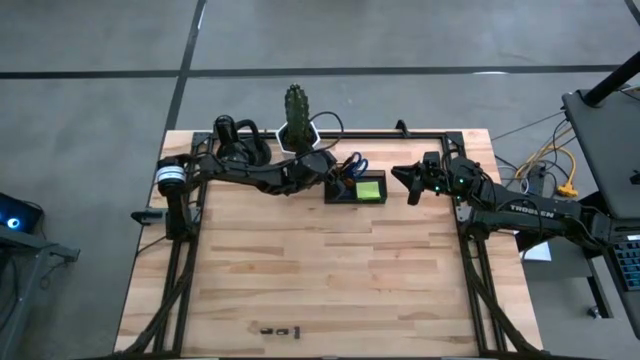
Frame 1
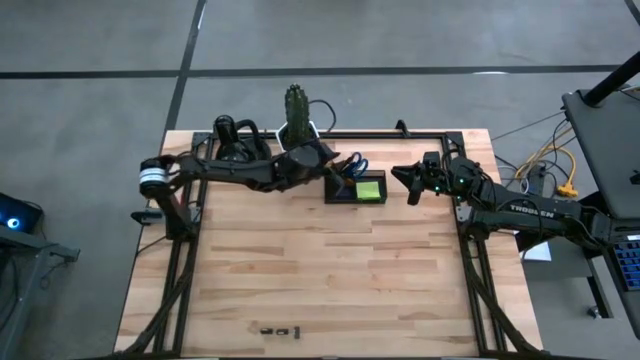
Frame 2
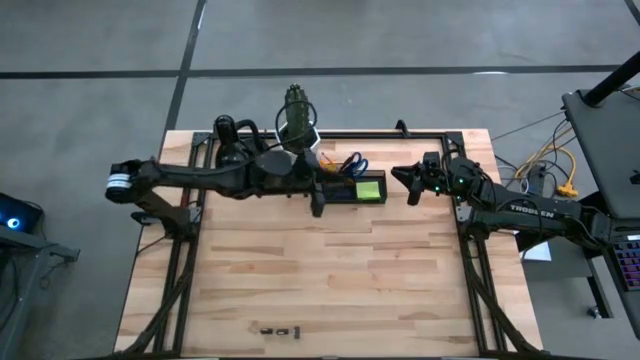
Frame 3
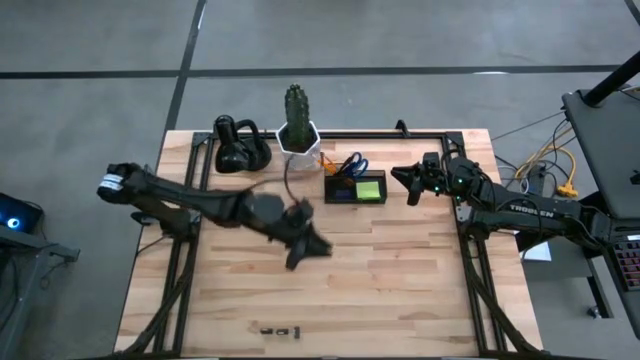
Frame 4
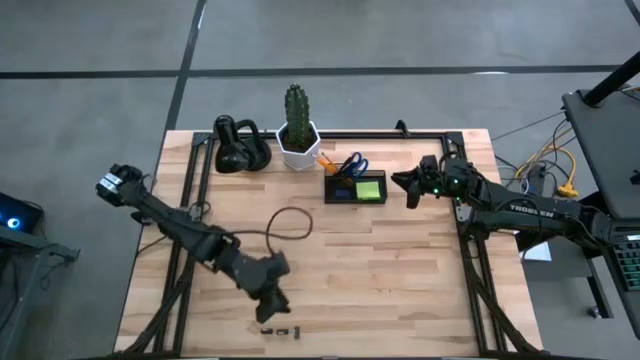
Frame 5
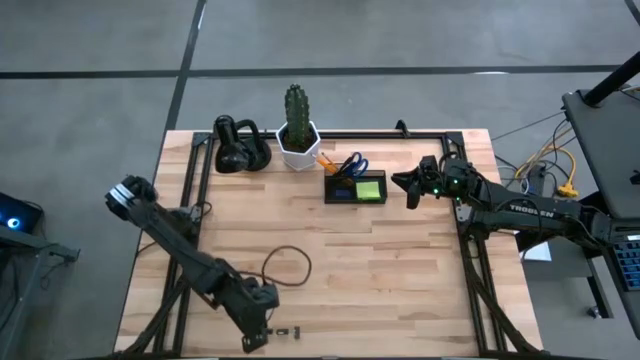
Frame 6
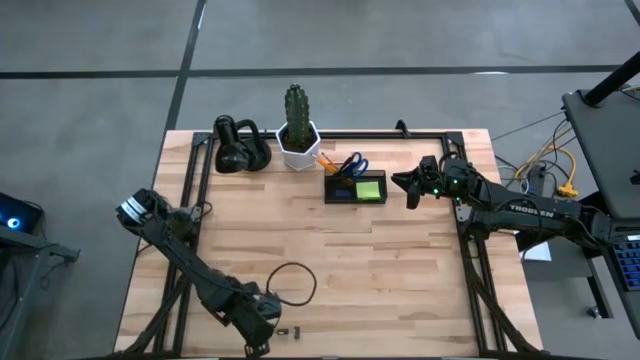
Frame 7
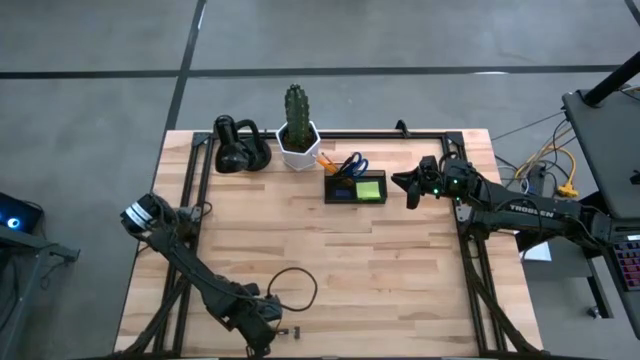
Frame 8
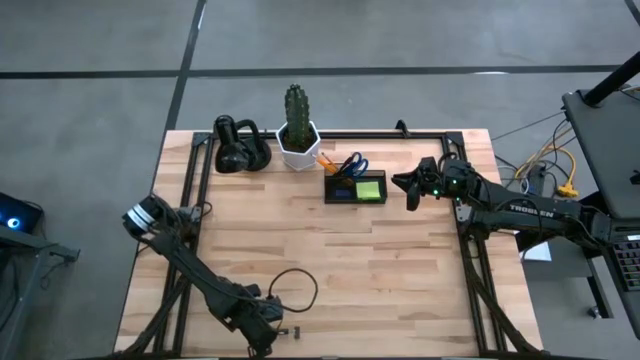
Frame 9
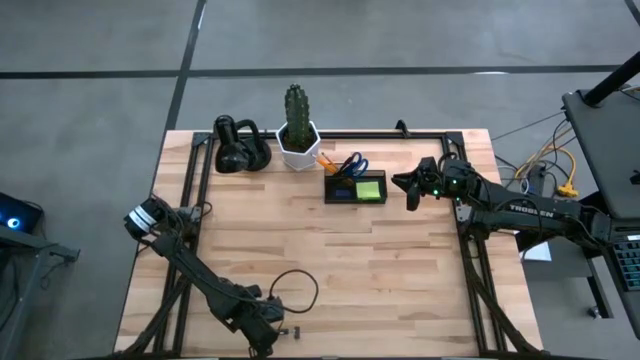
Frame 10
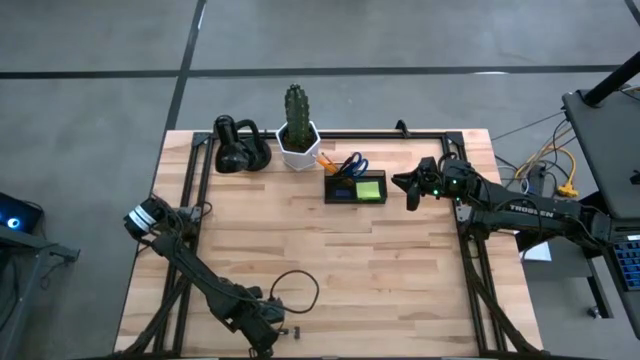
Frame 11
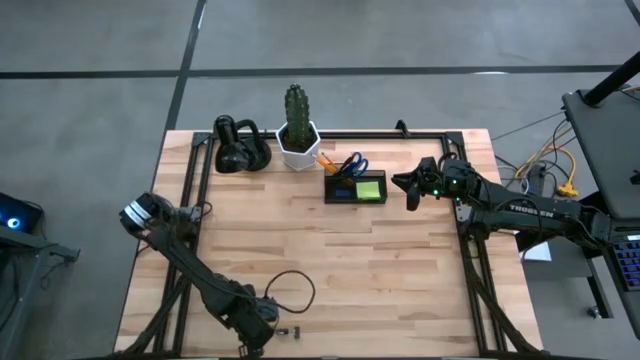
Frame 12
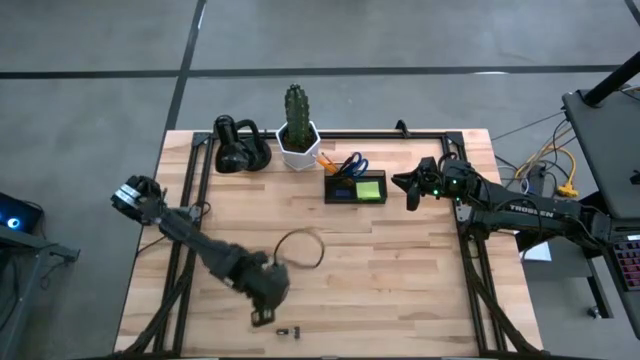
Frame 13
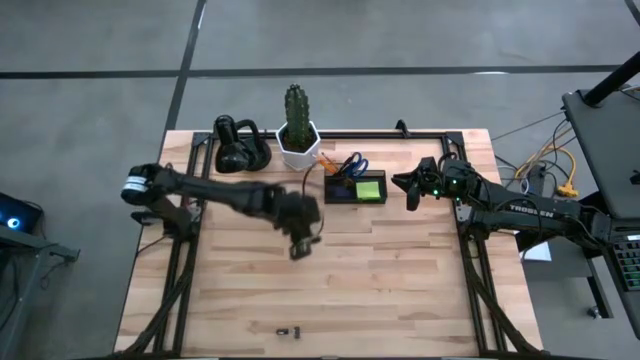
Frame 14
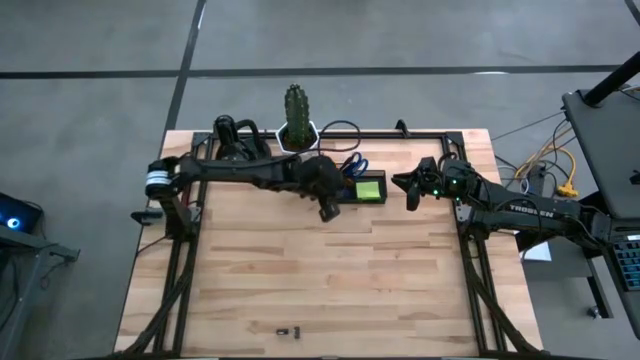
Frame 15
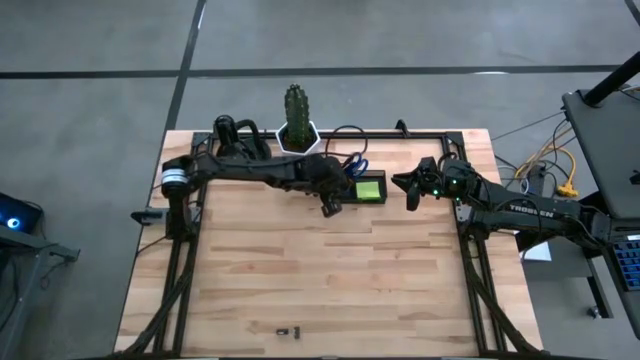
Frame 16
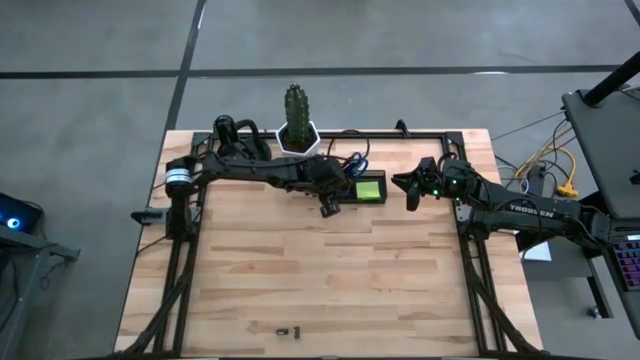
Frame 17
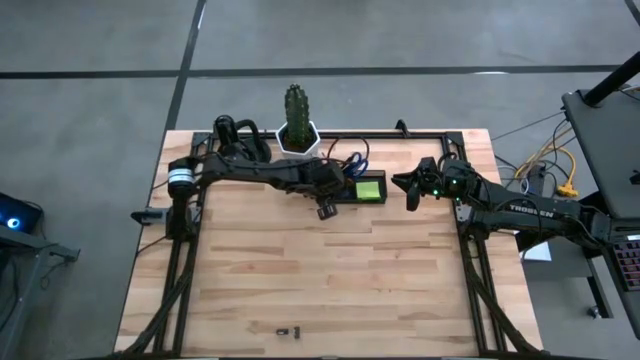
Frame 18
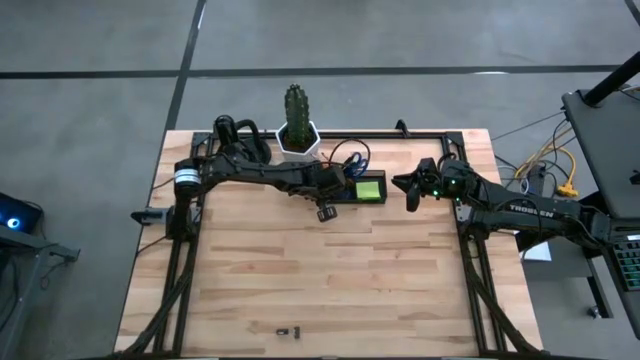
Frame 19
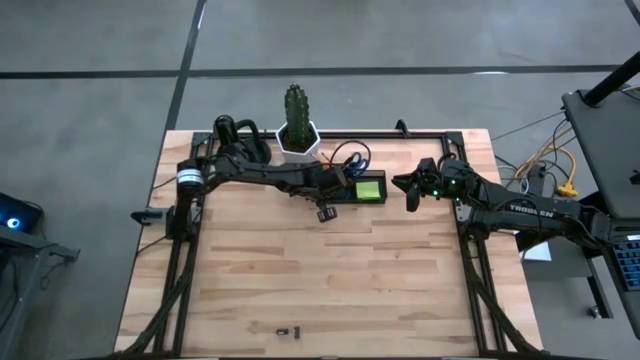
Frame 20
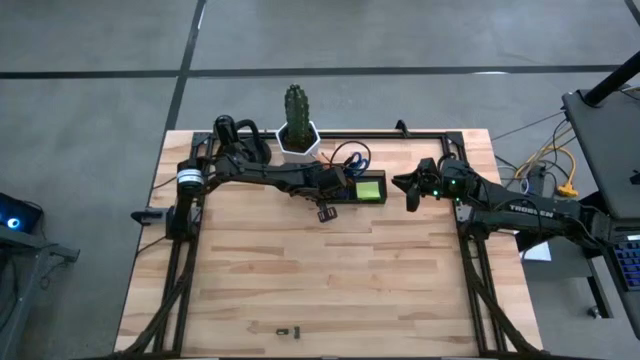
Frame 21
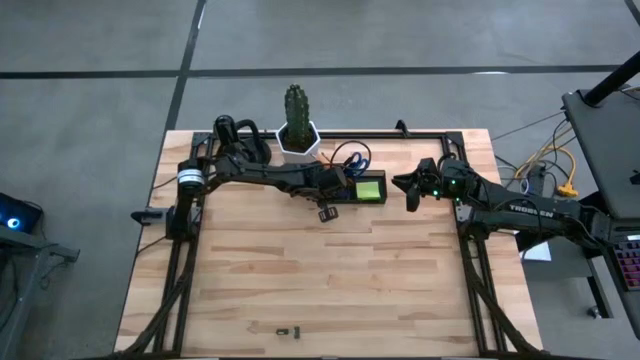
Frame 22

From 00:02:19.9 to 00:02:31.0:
Task: Pick and place office supplies into organizer
Put the left binder clip into the bottom section of the desk organizer

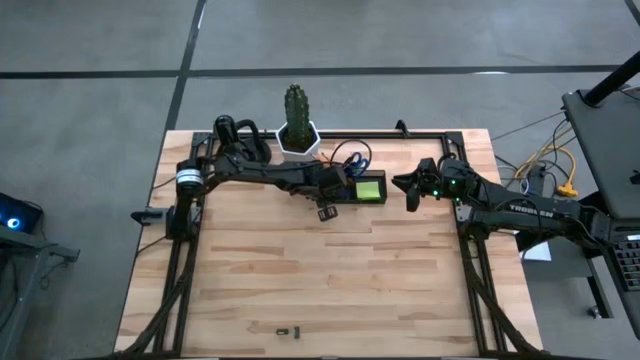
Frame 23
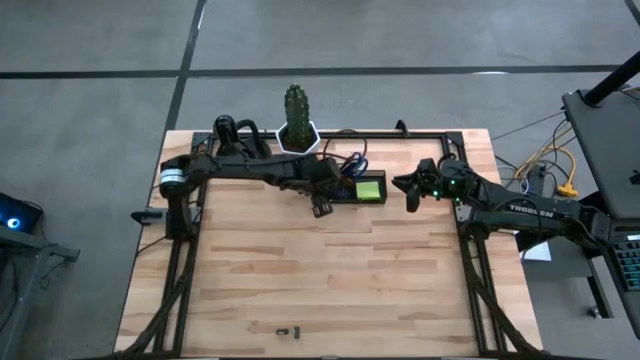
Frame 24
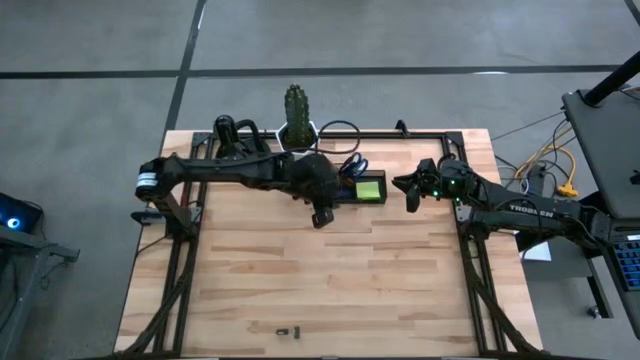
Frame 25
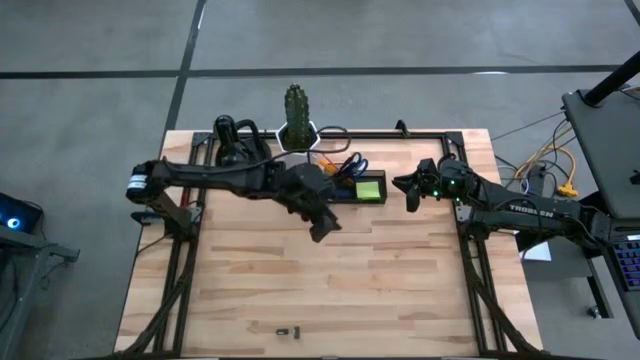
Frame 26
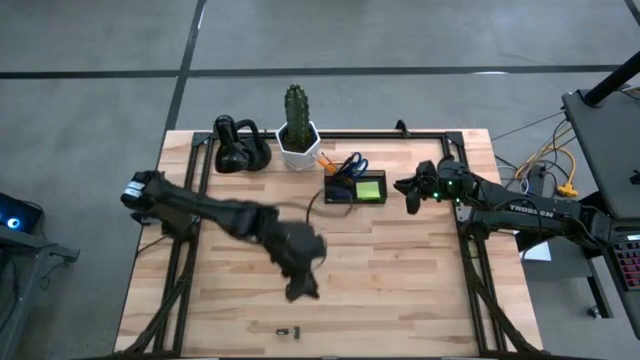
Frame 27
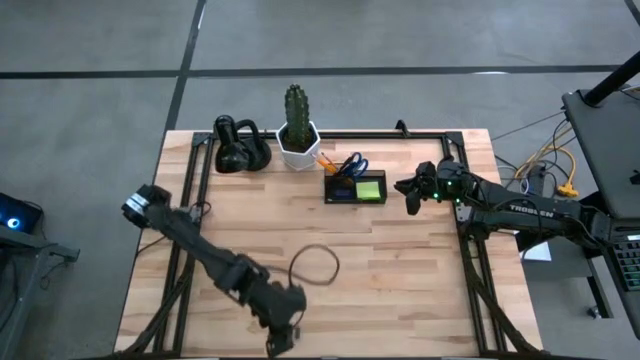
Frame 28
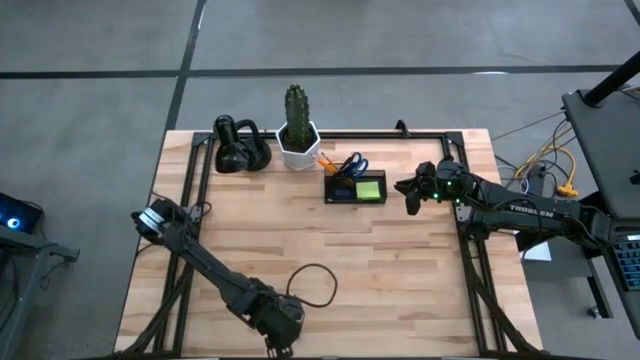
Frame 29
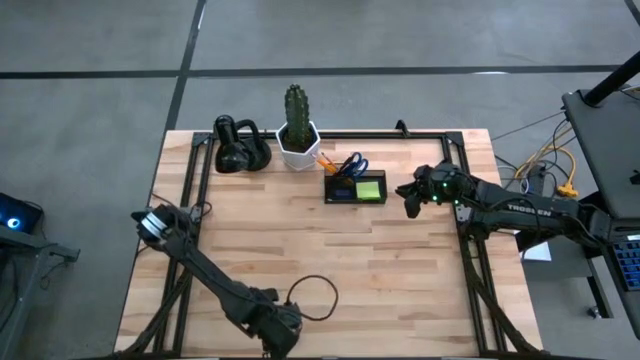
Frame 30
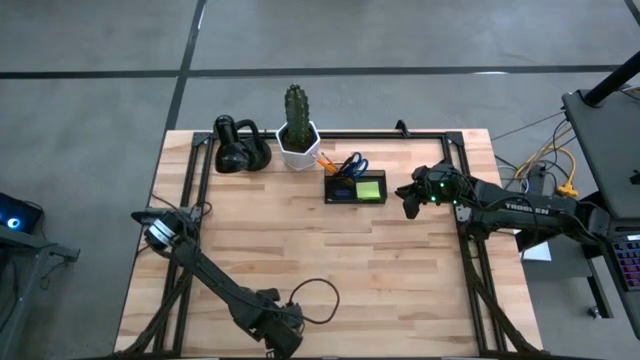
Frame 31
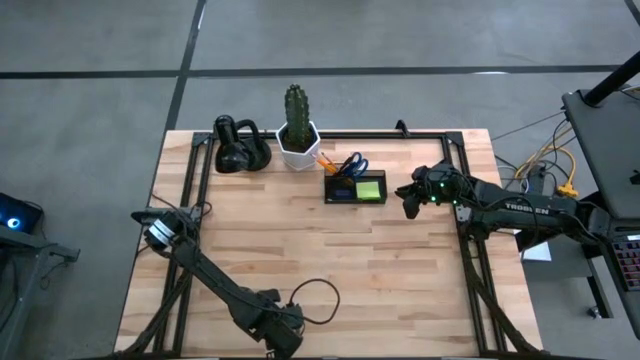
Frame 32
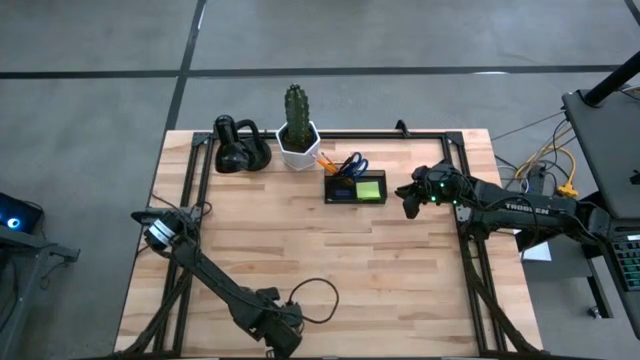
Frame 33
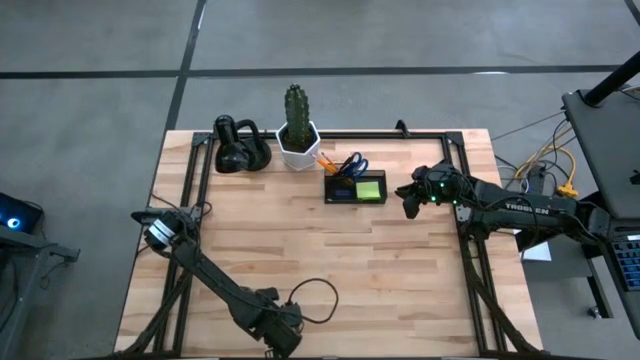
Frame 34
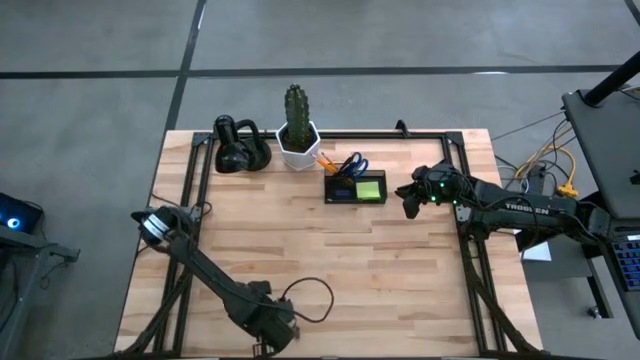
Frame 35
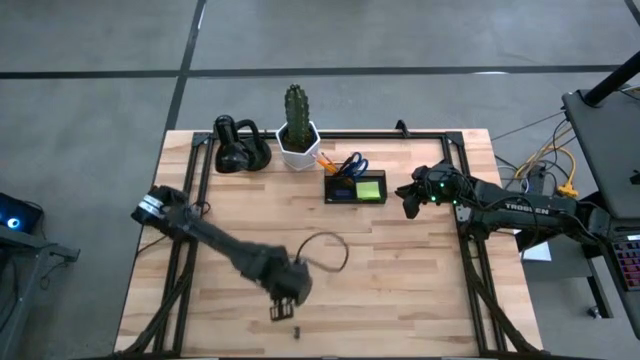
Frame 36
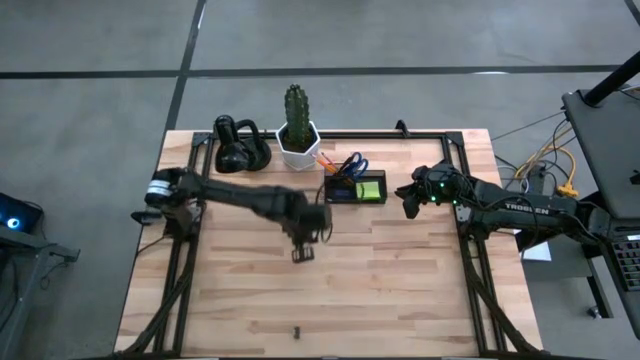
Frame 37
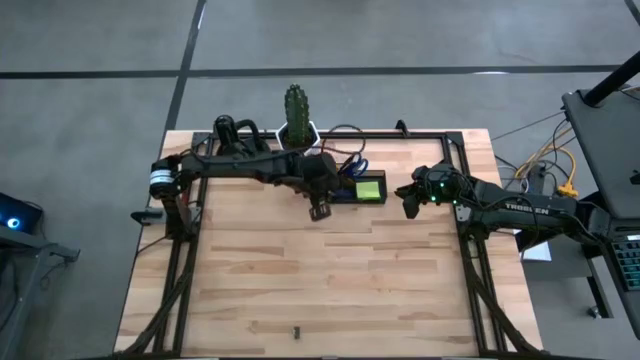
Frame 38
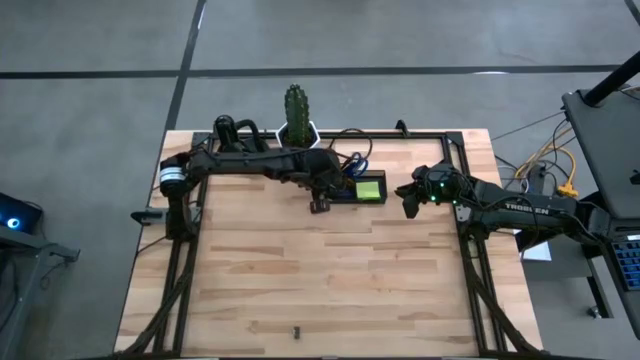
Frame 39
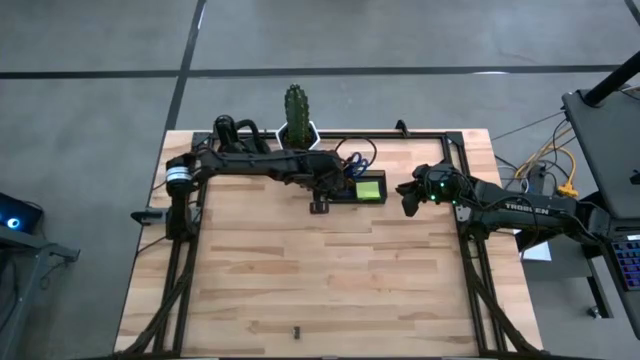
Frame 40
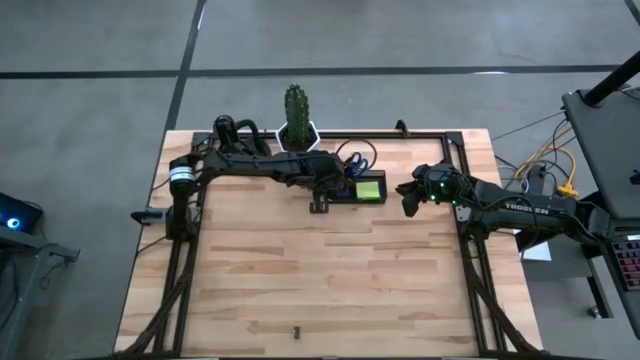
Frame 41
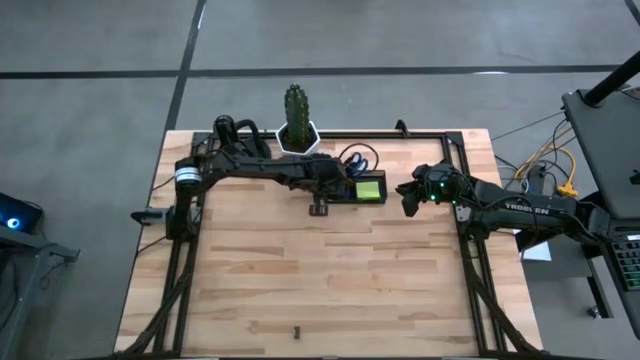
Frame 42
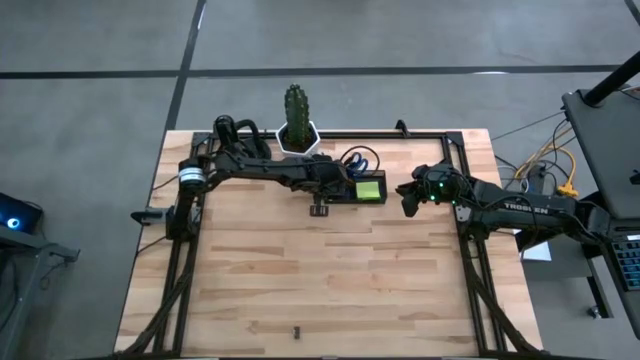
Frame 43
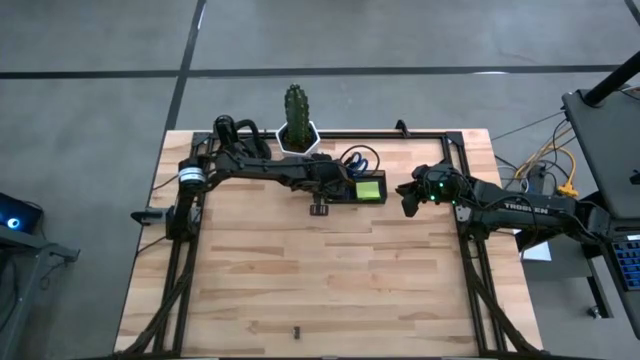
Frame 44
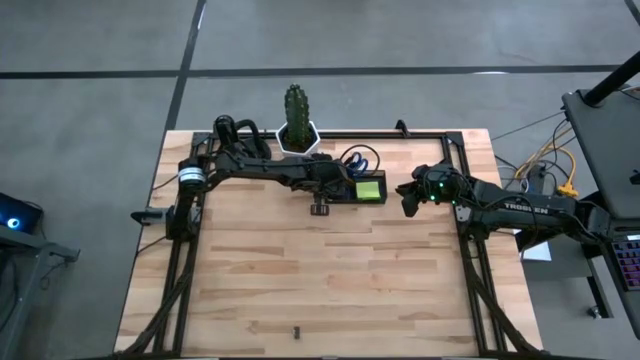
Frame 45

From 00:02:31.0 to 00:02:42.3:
Put the left binder clip into the bottom section of the desk organizer
